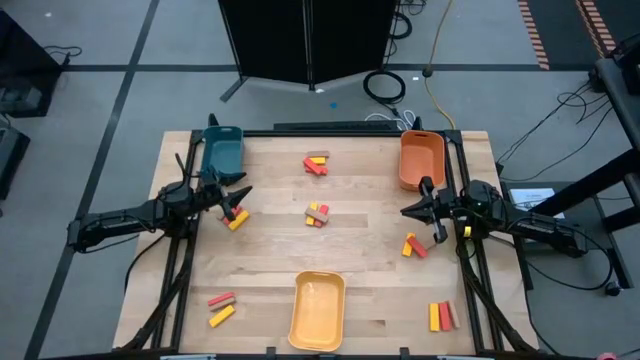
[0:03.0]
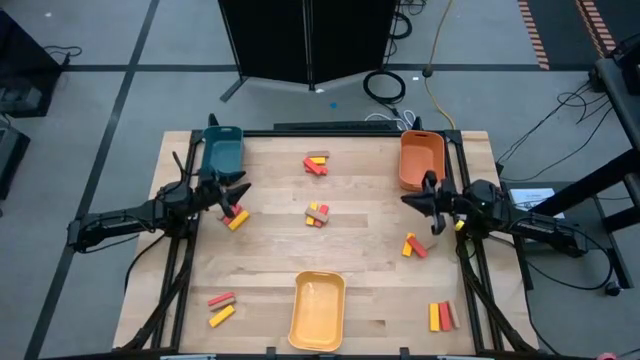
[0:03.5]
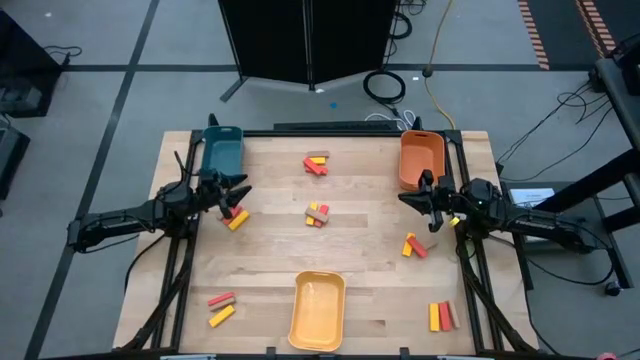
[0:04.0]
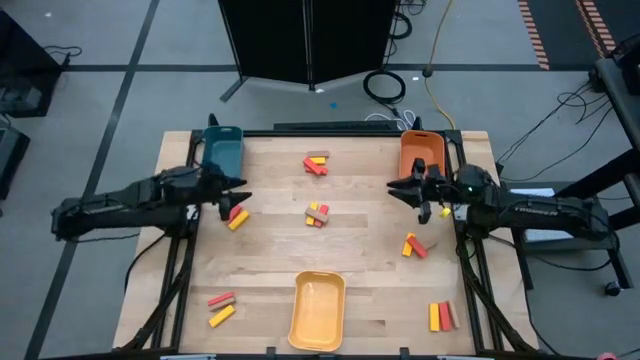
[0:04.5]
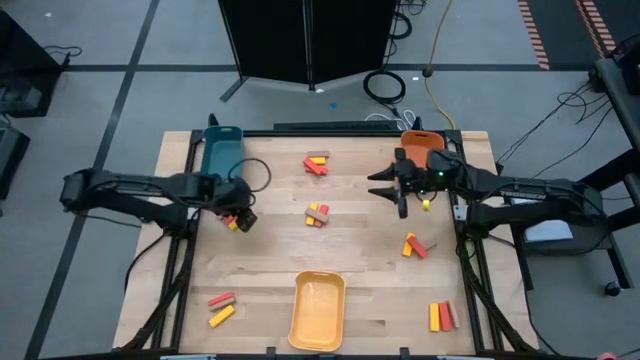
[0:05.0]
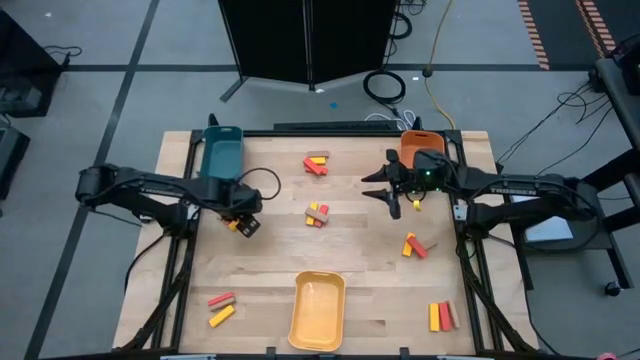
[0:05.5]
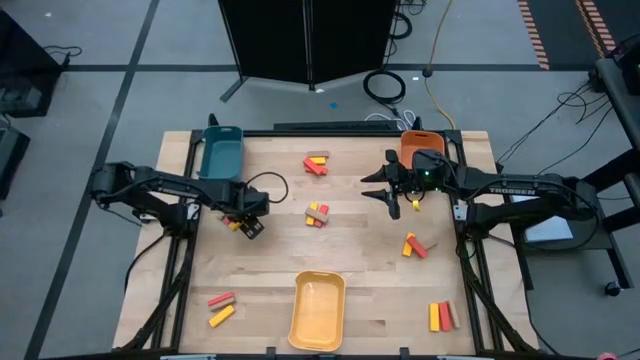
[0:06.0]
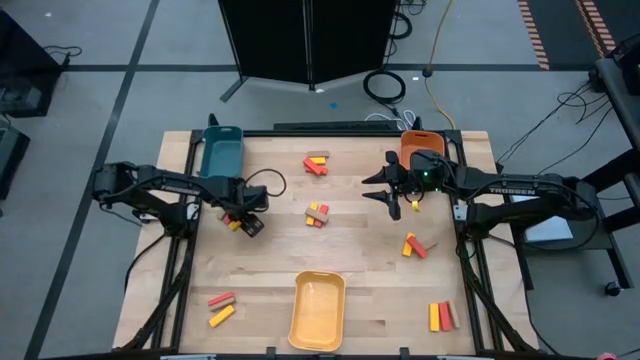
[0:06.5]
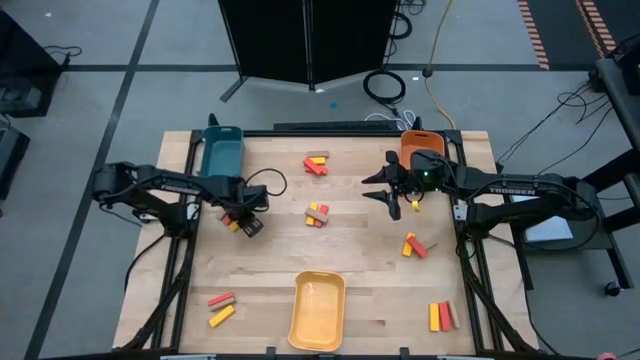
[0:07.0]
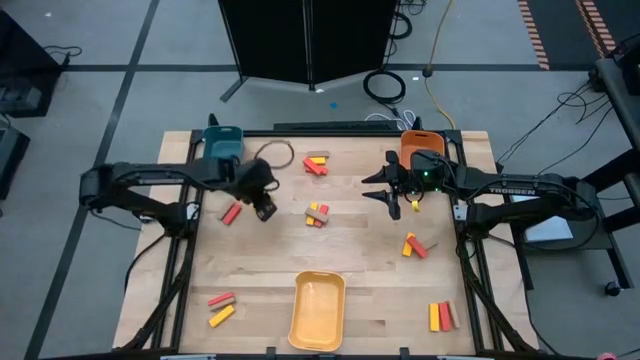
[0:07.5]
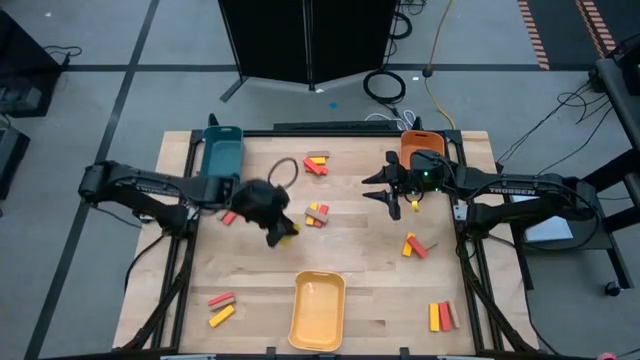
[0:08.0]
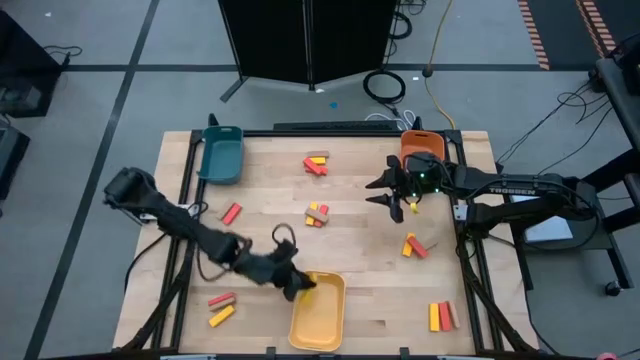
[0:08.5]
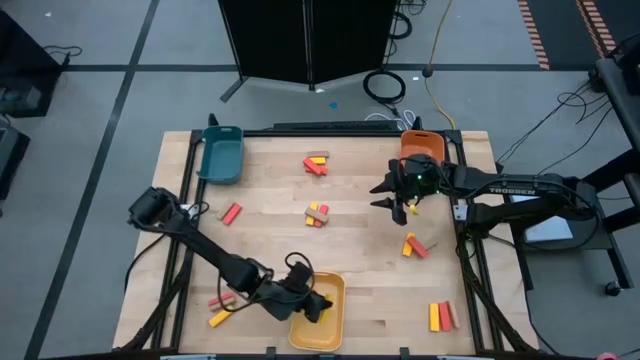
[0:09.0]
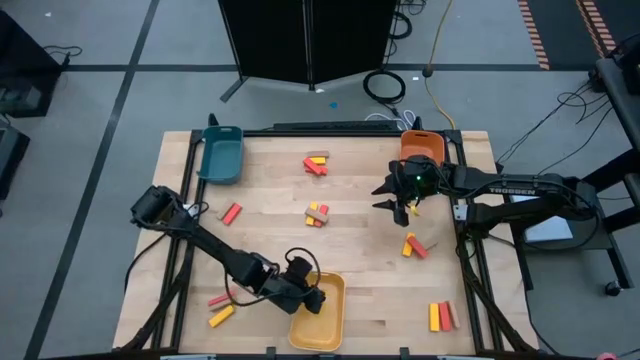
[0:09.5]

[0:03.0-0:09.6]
Task: Sort blocks
Put the yellow block into the yellow bin

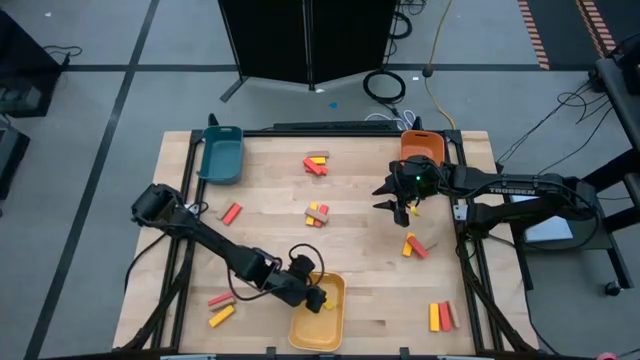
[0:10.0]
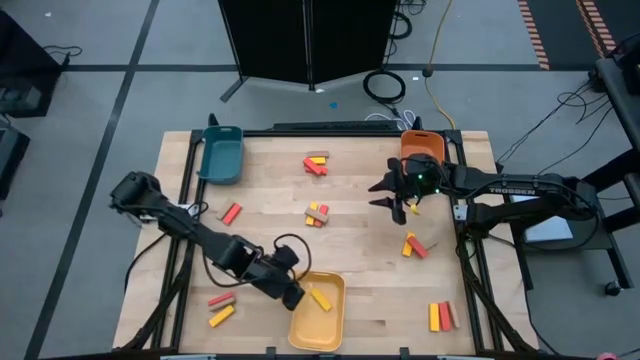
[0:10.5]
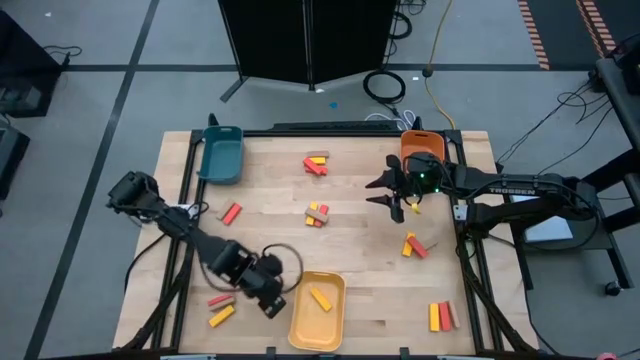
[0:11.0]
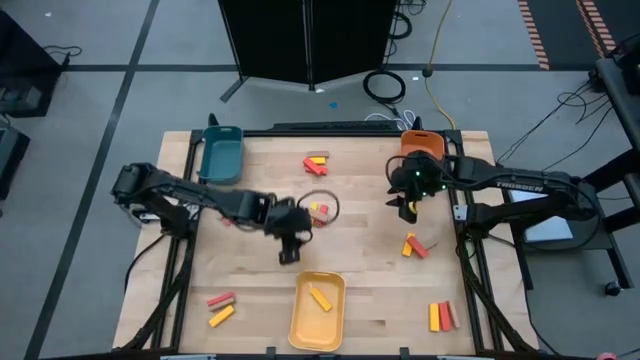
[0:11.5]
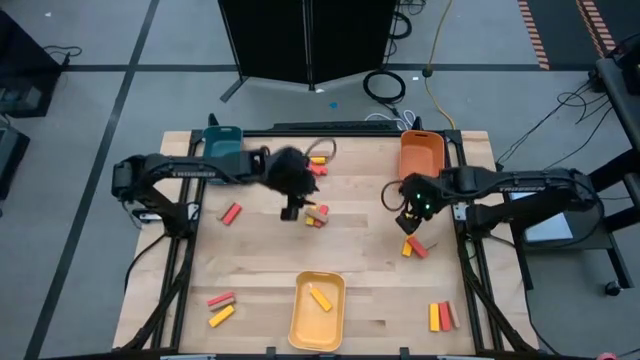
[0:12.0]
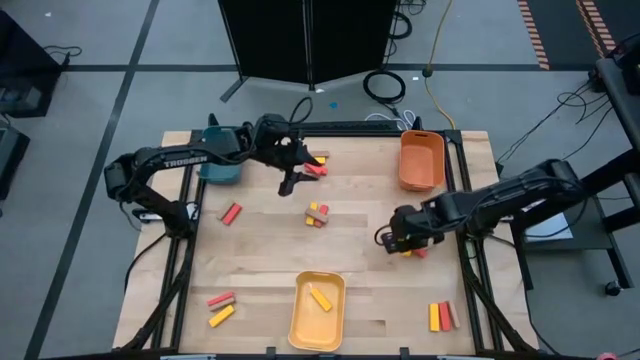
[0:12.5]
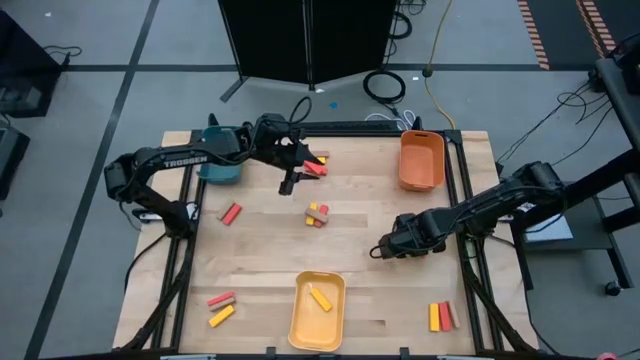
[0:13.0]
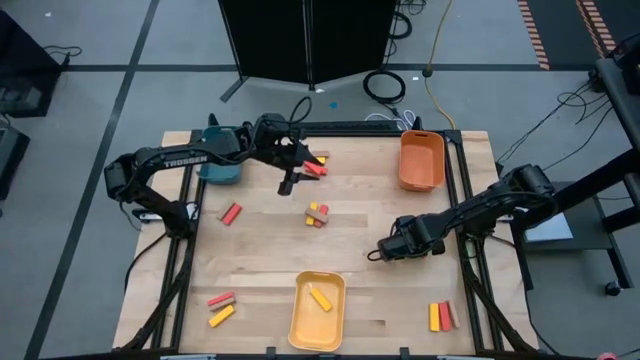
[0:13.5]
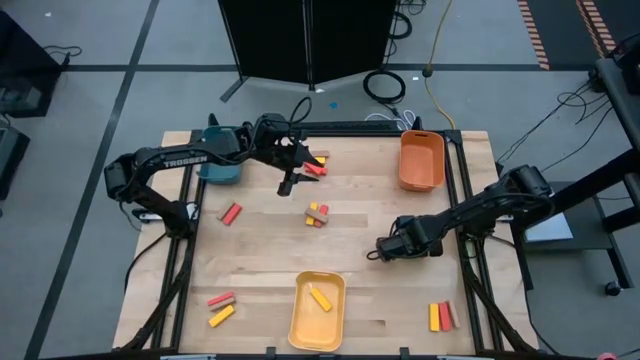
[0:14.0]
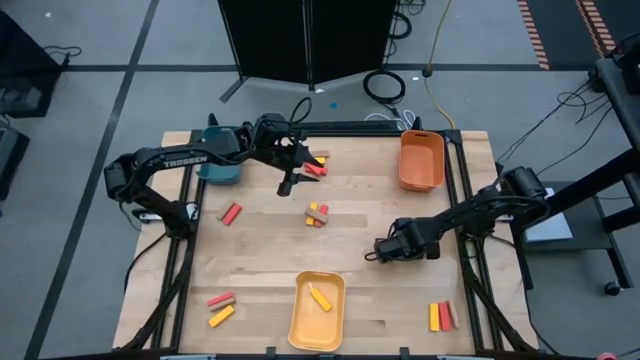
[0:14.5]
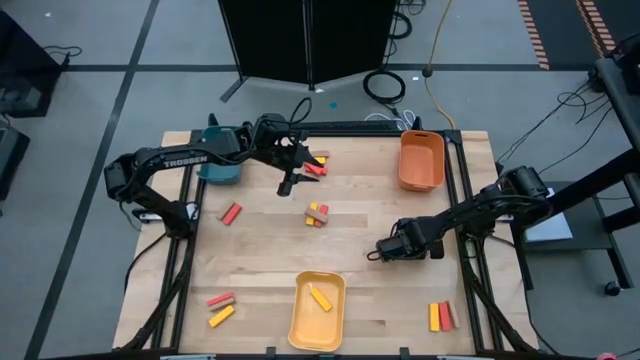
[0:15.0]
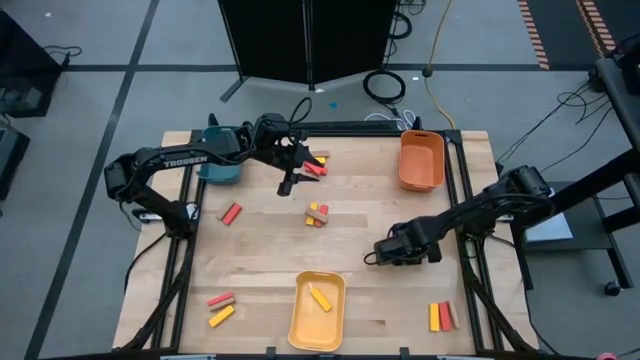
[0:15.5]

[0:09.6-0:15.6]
Put the yellow block into the yellow bin

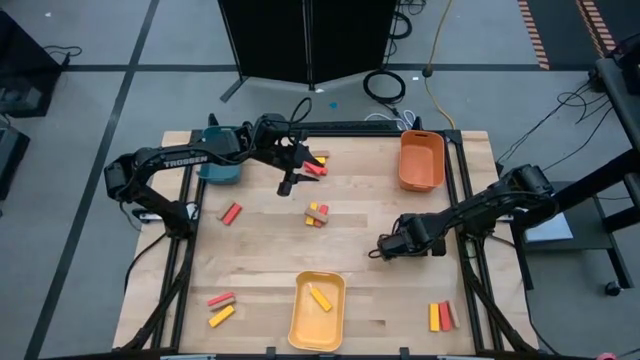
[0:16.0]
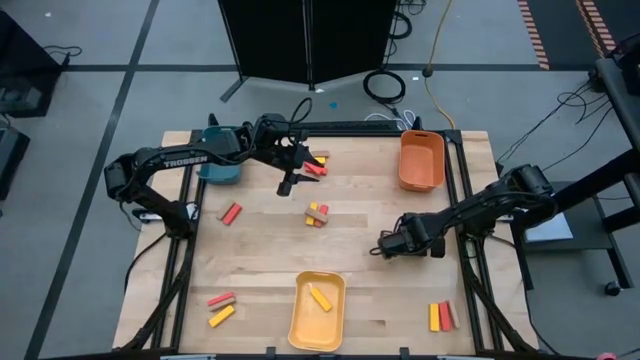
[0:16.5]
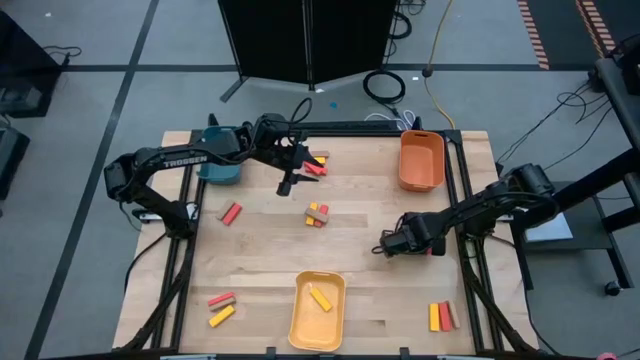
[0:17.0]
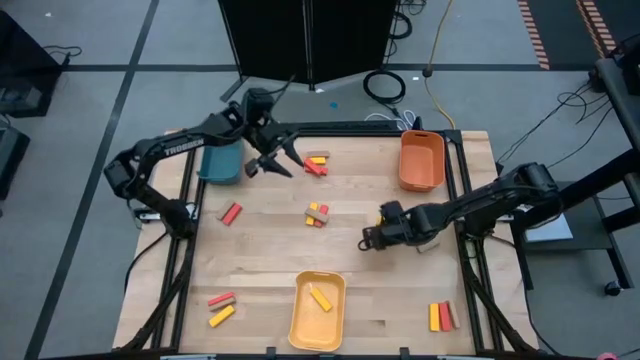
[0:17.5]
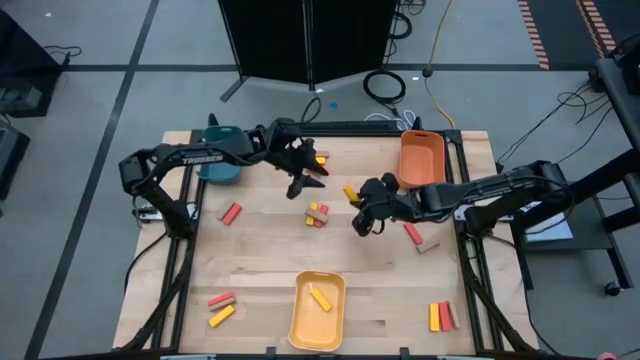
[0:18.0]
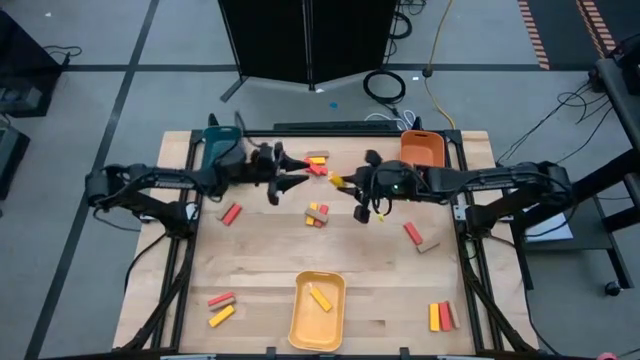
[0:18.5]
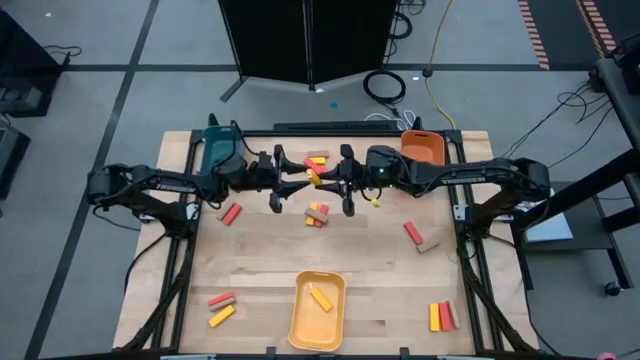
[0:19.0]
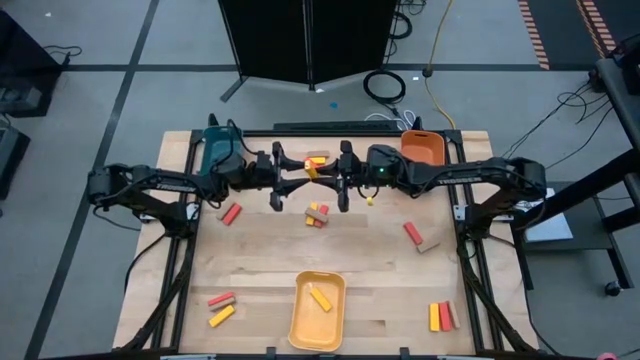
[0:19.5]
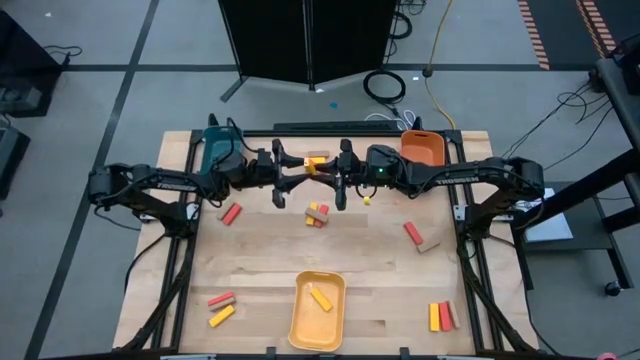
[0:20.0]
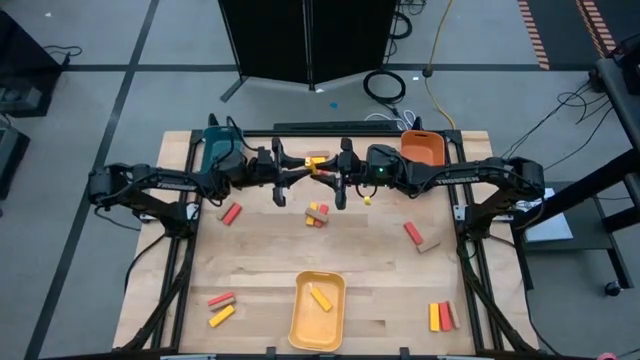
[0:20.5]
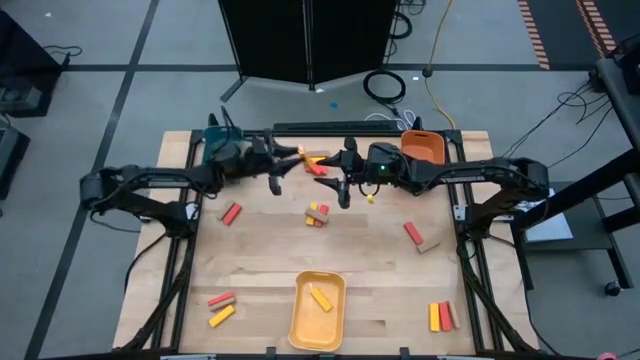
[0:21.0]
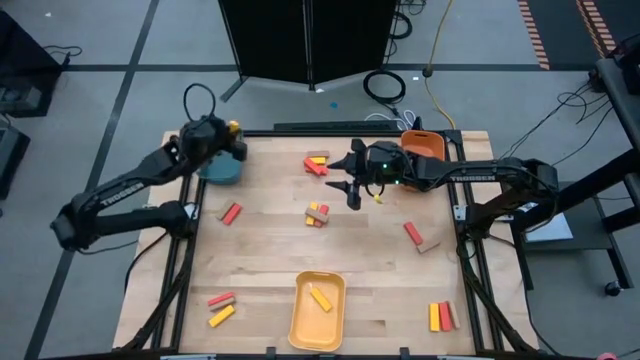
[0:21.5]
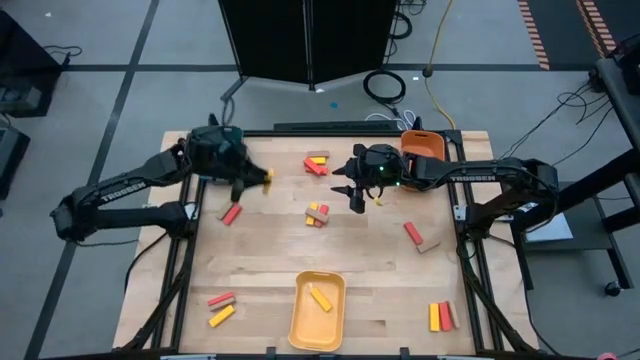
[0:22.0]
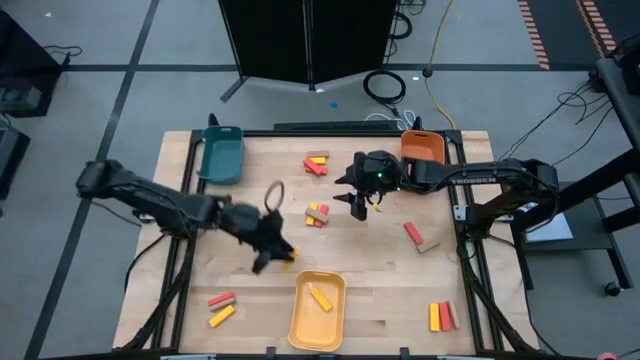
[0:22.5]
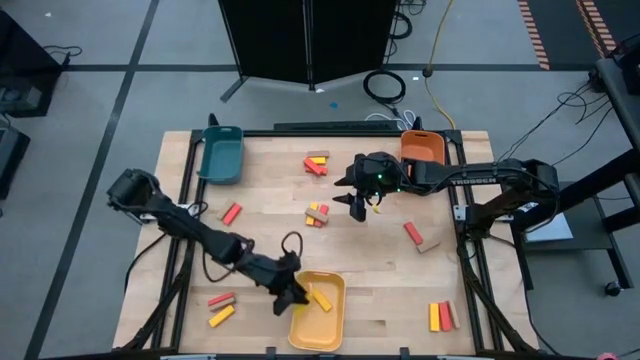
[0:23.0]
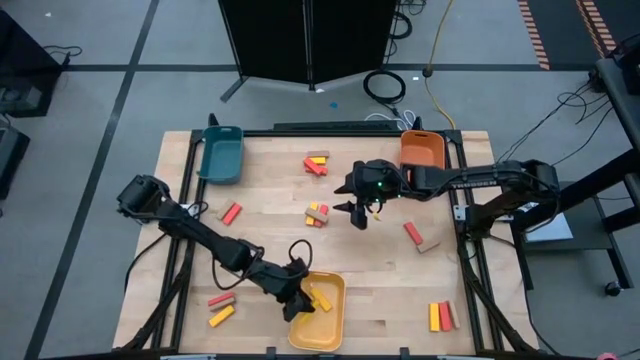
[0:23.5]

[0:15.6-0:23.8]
Put the yellow block into the yellow bin
